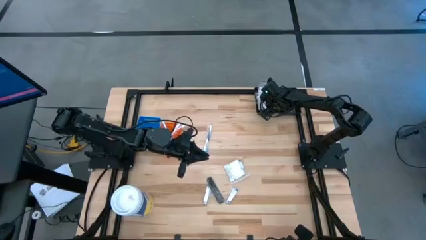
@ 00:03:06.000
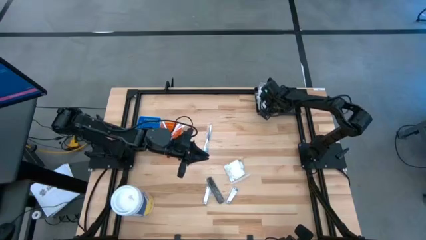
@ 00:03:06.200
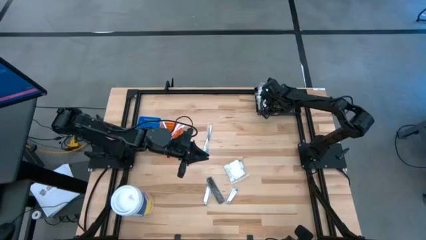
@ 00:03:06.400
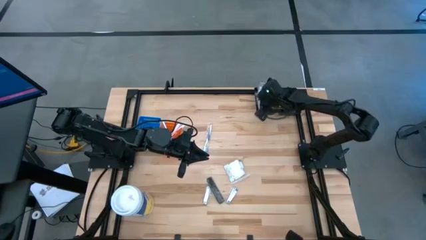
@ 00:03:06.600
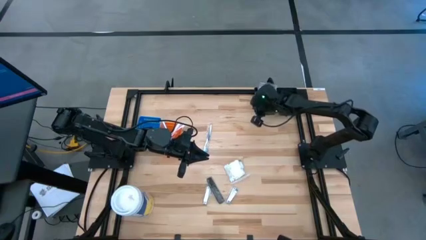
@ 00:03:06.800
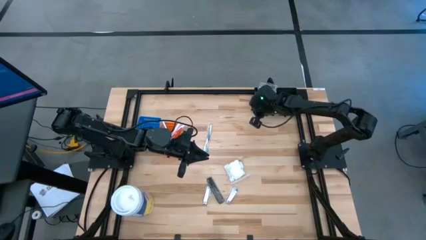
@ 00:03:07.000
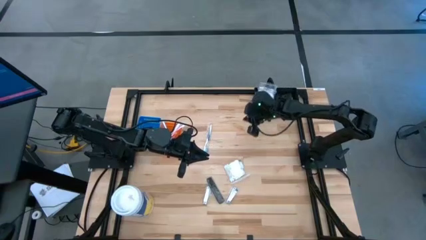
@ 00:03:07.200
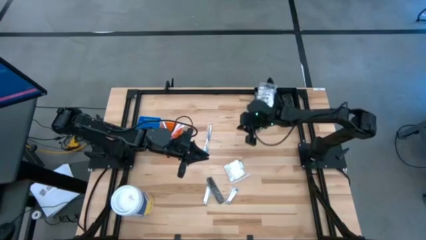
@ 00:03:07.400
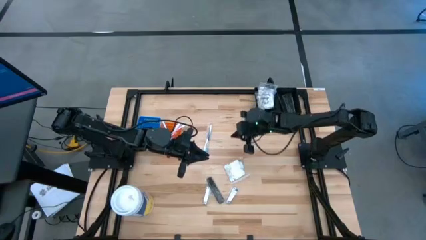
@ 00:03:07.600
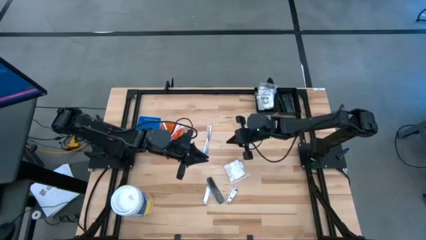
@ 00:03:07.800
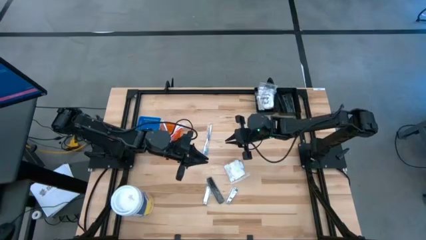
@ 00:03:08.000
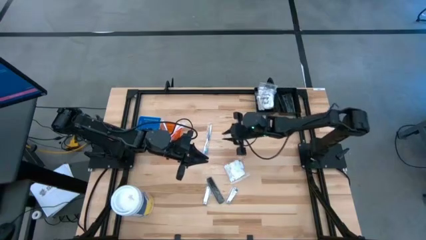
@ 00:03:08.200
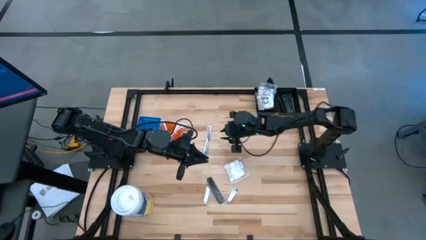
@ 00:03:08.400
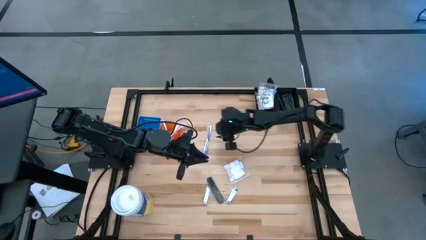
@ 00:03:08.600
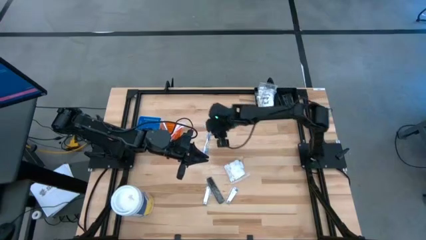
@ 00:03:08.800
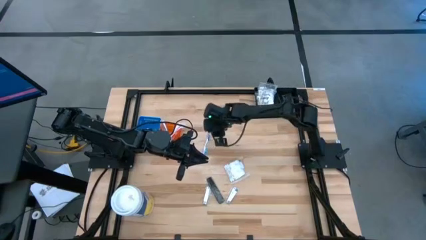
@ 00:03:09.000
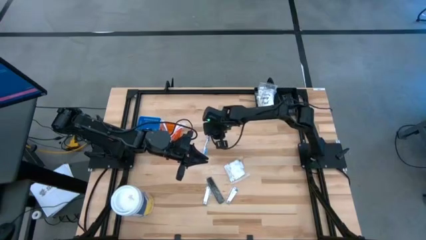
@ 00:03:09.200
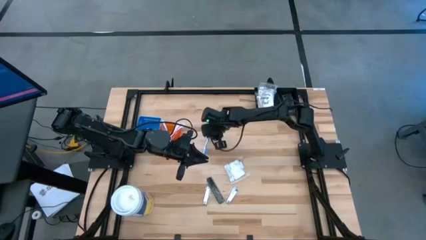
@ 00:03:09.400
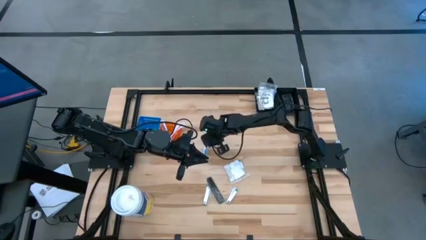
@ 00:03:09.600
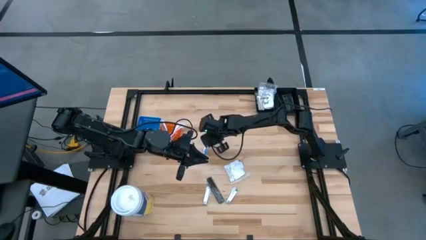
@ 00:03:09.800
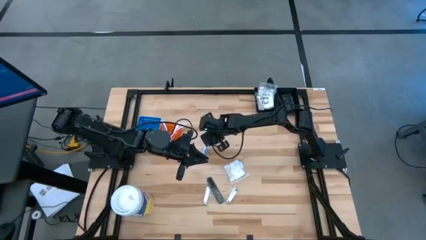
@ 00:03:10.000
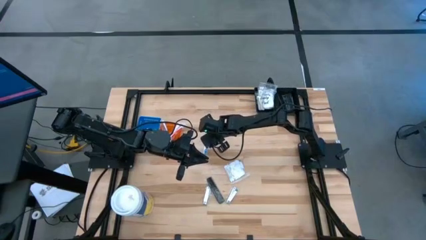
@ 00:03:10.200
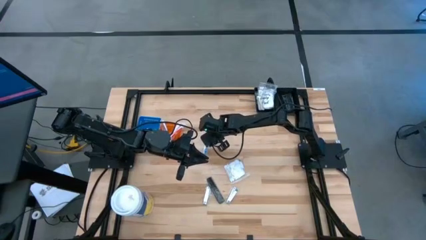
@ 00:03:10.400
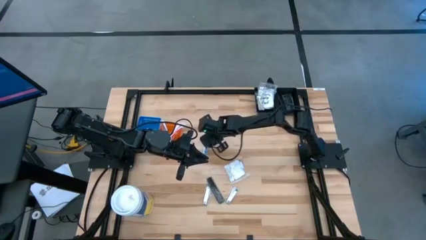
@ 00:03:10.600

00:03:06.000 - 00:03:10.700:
Task: Pick & Place Travel size toiletries
Put the dark blue toothbrush into the orange bin

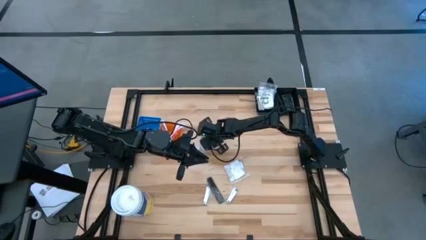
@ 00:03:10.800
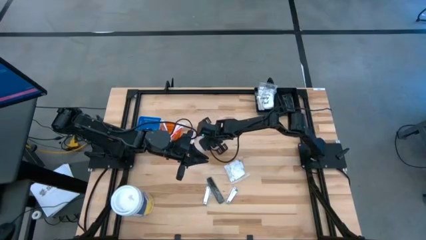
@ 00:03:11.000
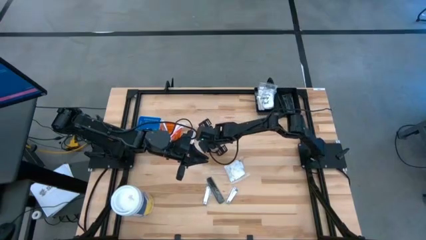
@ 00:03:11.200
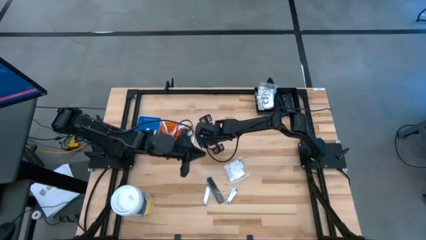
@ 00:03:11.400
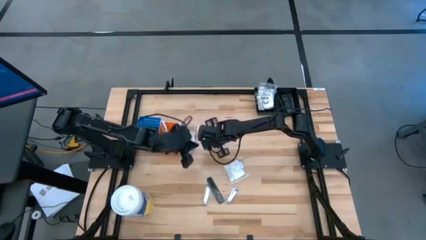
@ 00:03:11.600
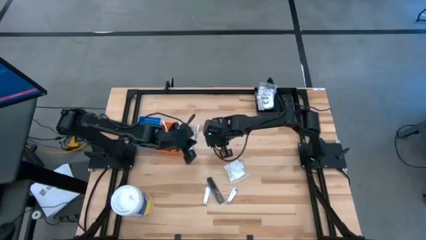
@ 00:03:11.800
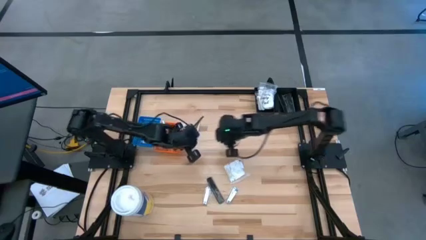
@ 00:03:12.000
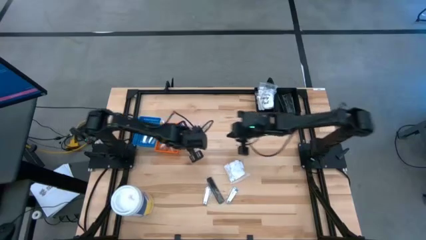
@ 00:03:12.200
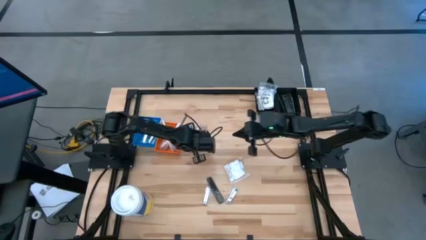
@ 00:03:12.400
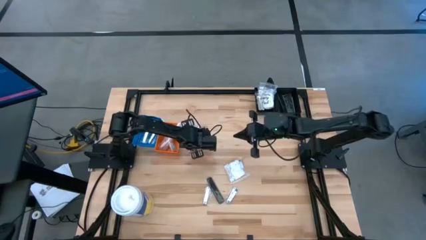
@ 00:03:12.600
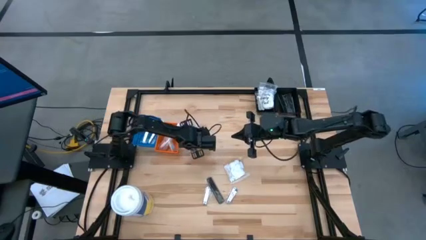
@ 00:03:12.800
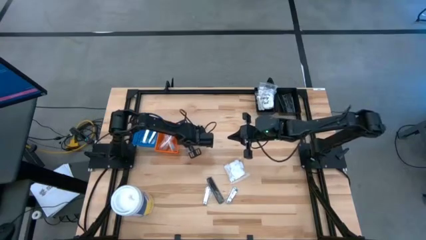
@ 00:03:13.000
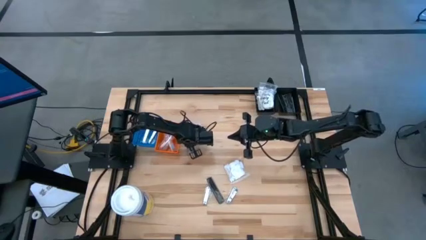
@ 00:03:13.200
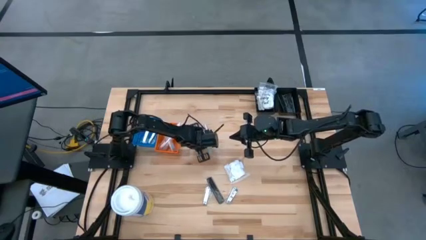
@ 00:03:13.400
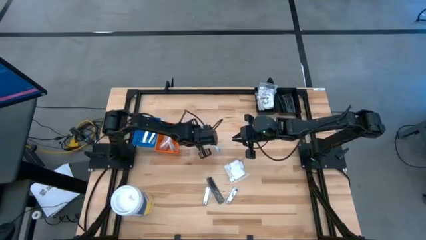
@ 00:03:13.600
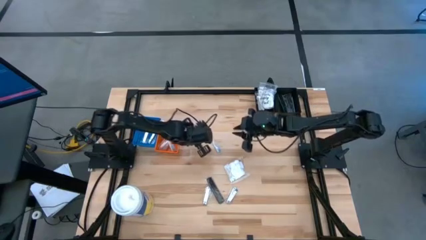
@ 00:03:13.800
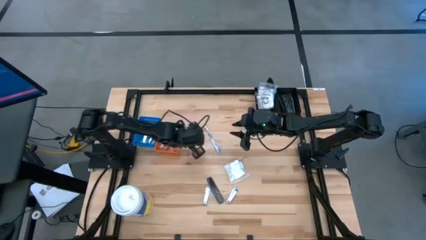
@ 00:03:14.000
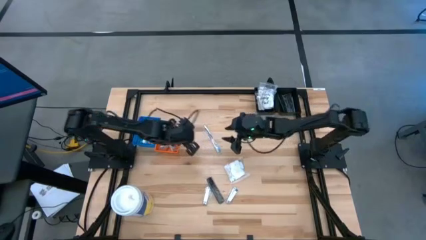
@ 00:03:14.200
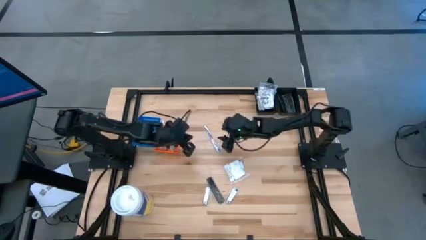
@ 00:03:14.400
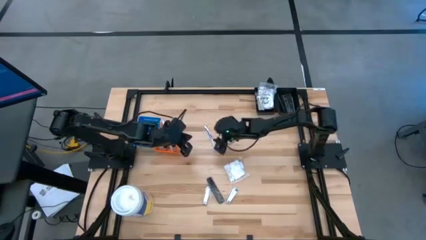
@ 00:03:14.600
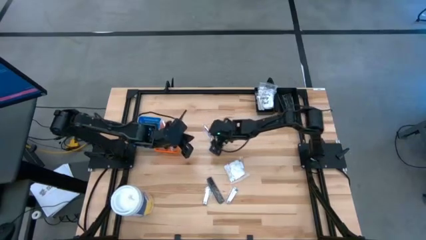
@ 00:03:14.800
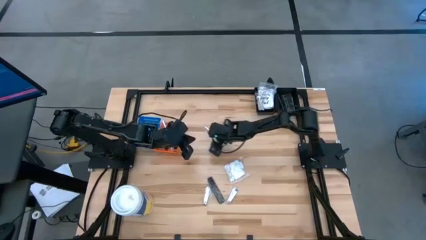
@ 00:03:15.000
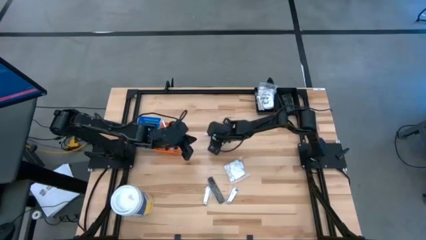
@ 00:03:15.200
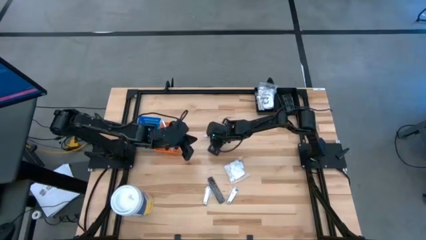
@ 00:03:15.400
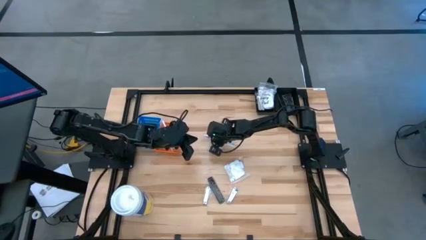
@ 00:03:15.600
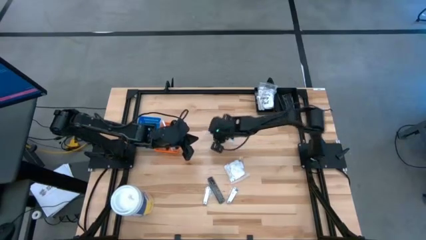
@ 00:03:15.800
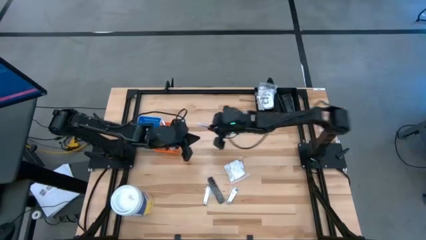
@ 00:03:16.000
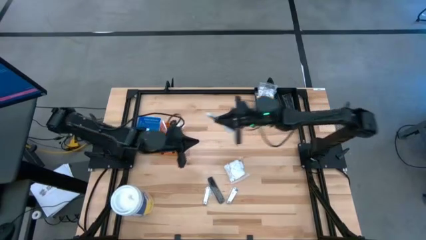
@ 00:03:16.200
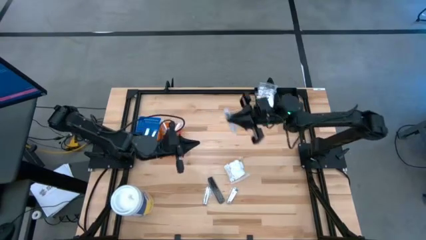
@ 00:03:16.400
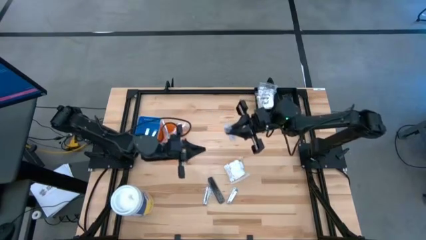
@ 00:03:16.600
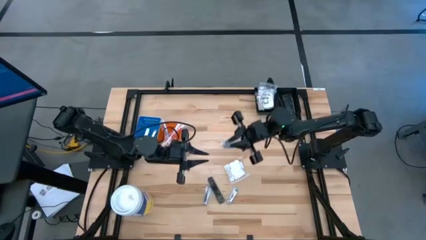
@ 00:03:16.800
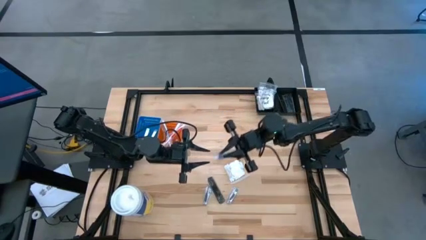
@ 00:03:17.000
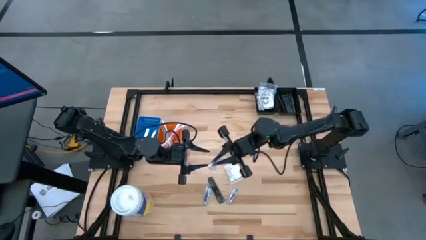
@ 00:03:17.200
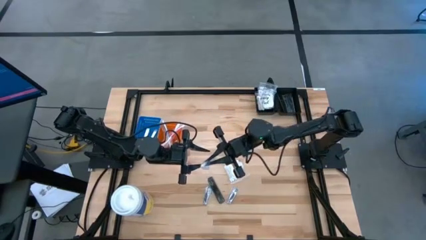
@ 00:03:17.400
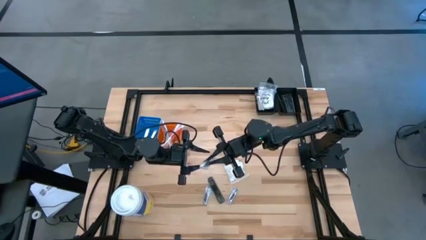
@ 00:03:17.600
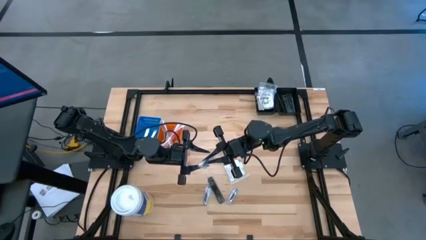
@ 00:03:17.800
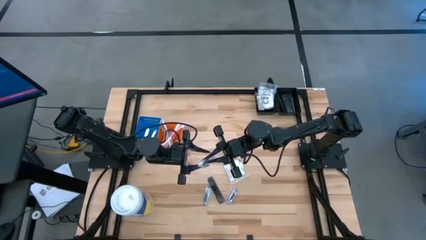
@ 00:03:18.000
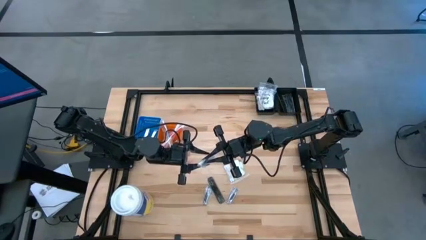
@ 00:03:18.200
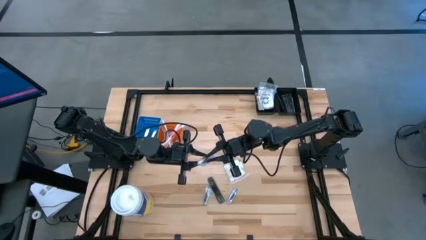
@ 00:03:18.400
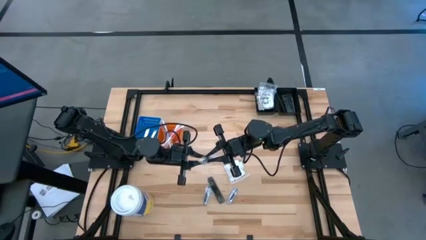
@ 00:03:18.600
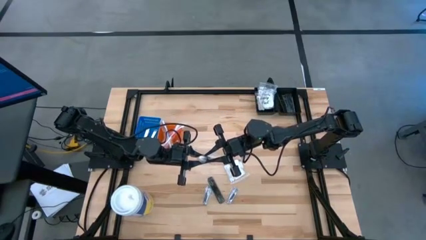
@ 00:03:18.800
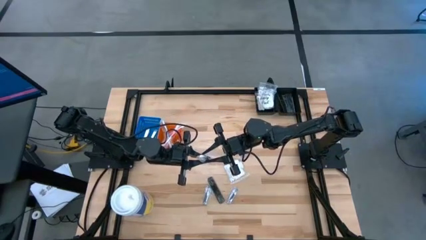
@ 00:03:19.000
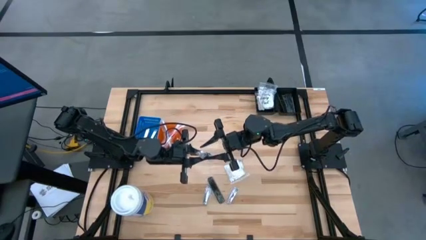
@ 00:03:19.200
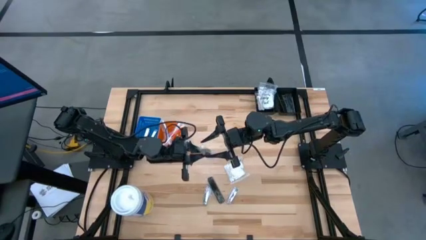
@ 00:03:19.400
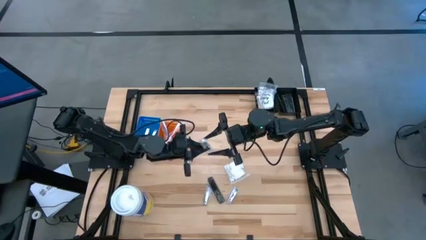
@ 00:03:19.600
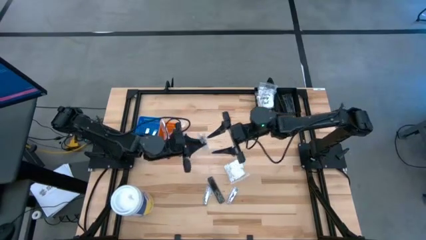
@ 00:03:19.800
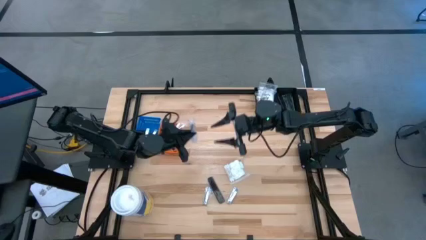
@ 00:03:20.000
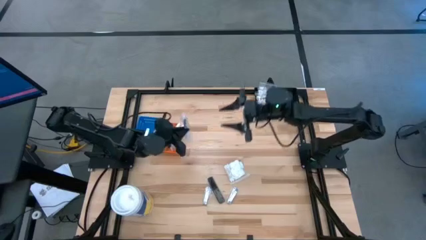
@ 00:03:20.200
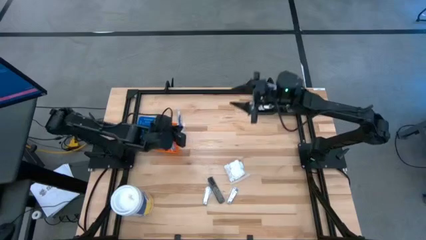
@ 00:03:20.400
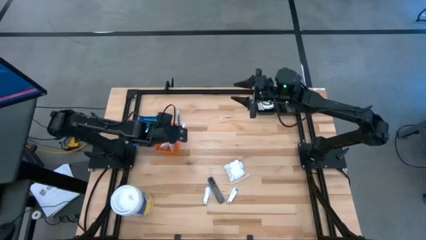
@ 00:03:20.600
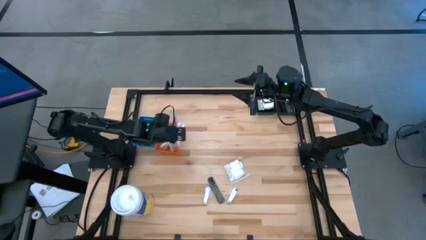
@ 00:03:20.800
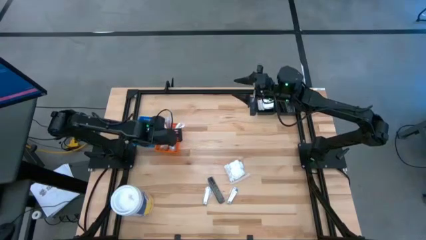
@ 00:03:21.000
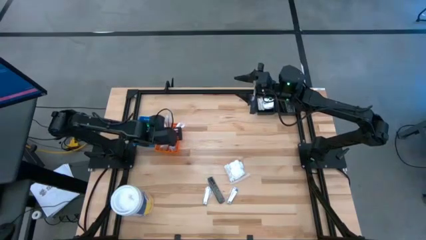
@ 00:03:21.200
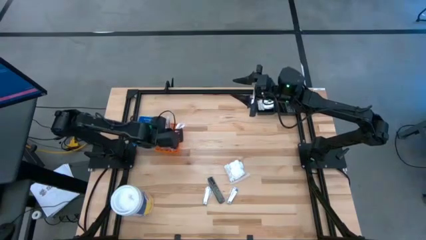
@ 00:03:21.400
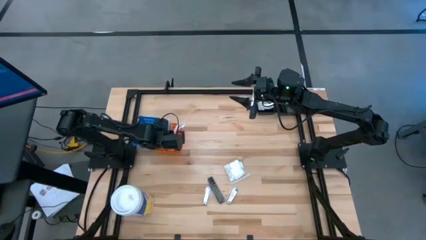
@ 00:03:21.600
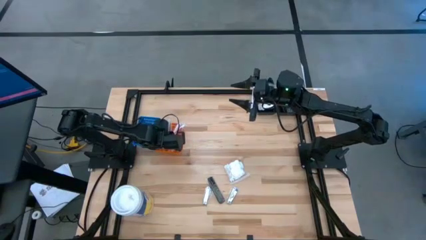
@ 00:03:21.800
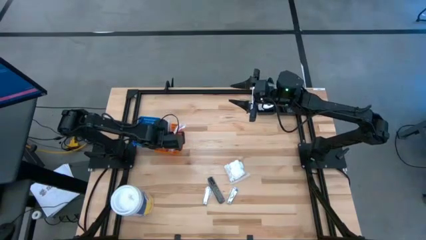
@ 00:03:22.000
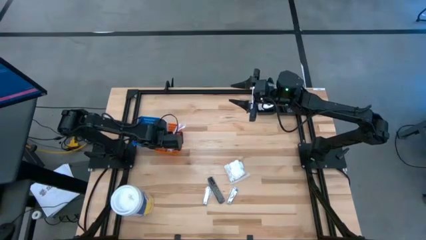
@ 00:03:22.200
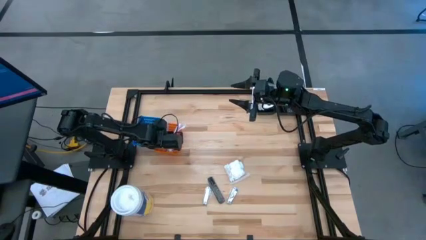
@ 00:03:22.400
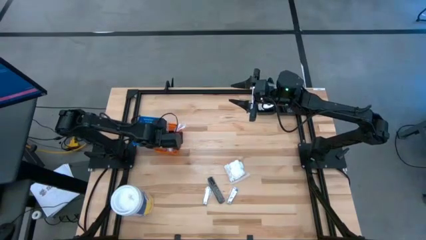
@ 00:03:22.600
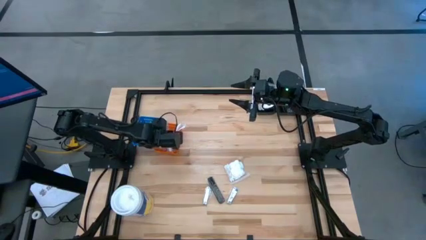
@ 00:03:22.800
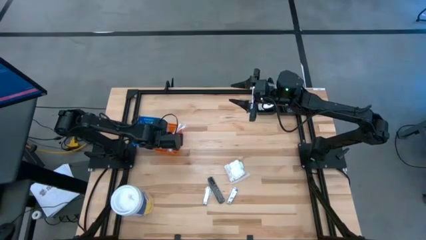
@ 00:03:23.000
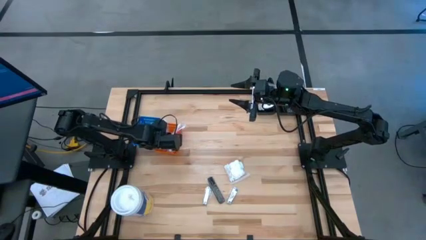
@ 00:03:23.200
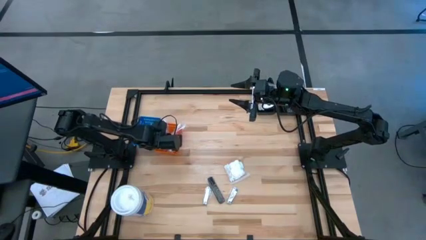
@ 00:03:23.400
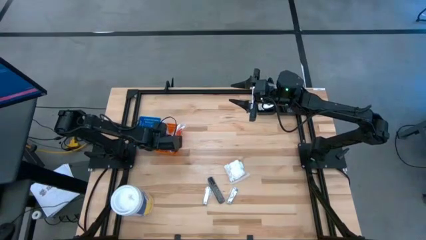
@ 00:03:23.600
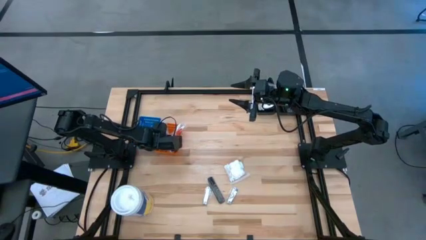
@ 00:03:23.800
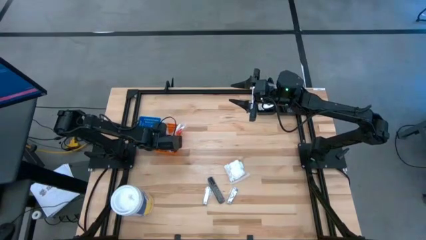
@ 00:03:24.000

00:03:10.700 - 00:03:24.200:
Put the dark blue toothbrush into the orange bin
